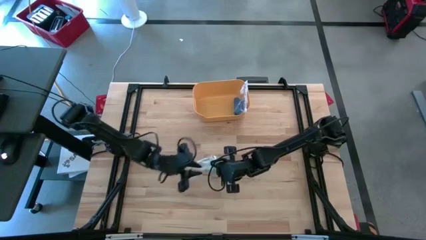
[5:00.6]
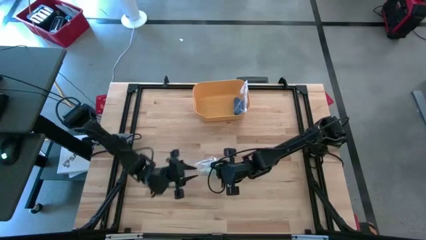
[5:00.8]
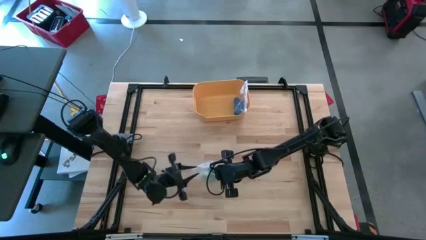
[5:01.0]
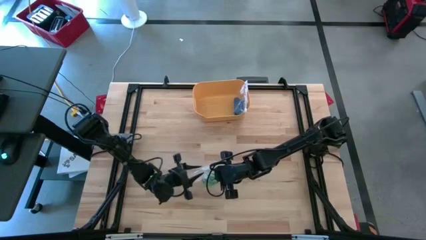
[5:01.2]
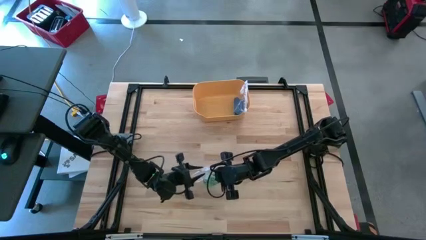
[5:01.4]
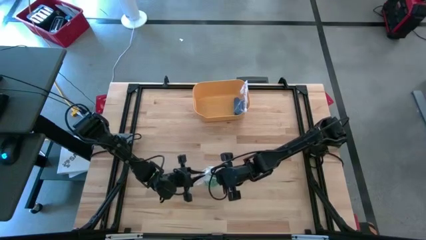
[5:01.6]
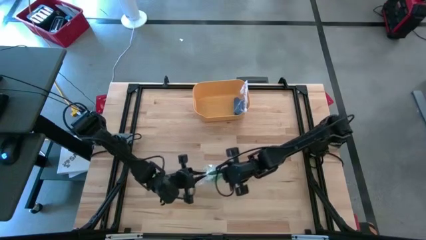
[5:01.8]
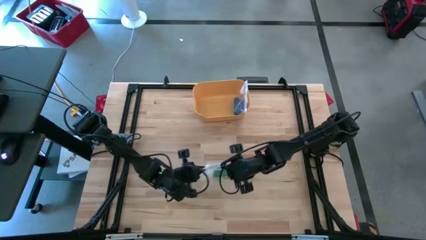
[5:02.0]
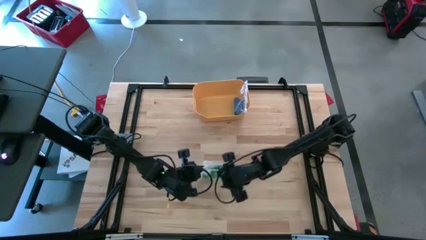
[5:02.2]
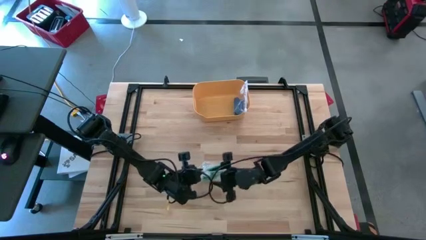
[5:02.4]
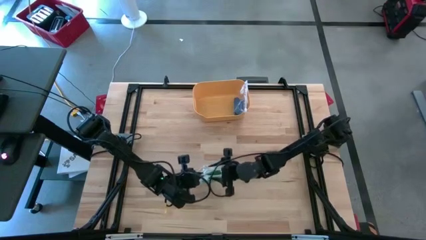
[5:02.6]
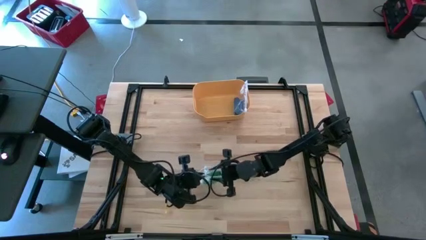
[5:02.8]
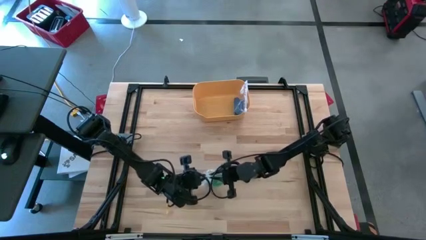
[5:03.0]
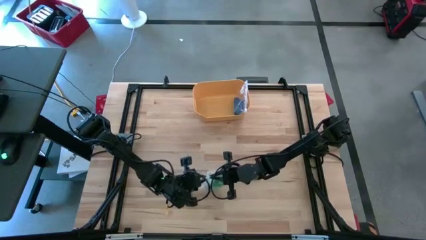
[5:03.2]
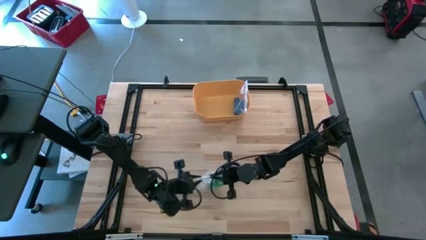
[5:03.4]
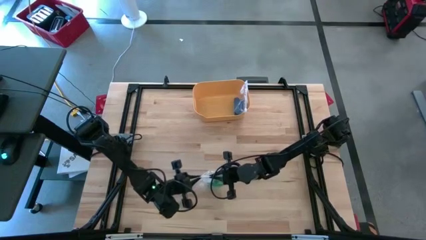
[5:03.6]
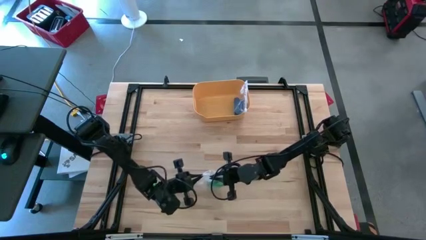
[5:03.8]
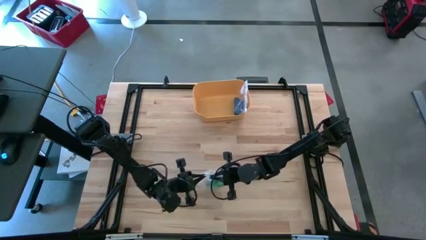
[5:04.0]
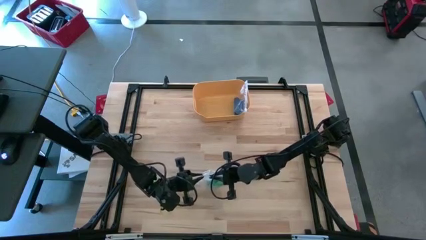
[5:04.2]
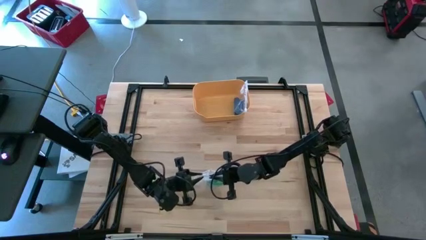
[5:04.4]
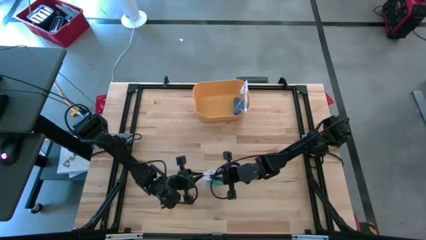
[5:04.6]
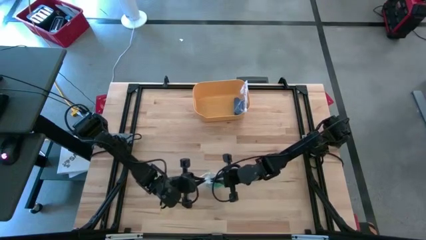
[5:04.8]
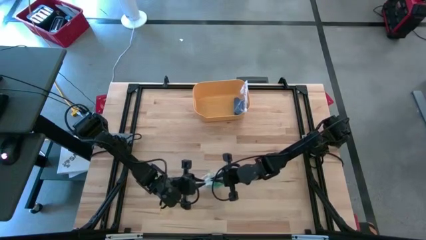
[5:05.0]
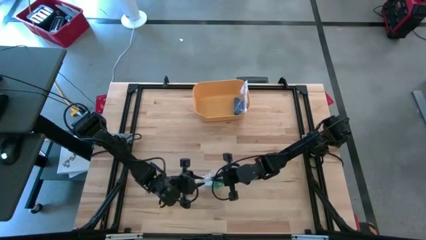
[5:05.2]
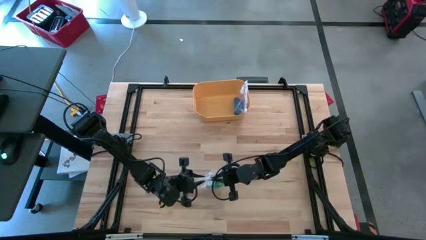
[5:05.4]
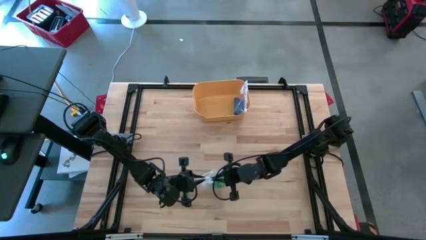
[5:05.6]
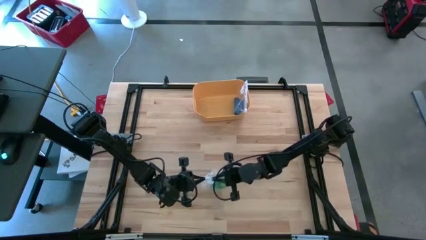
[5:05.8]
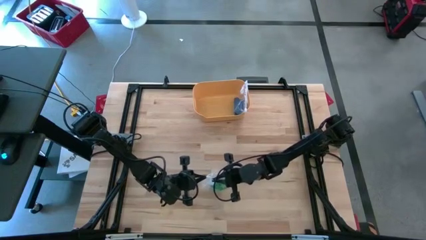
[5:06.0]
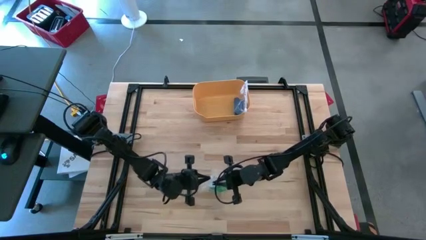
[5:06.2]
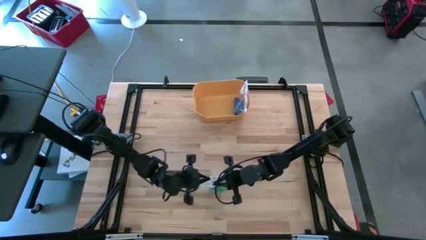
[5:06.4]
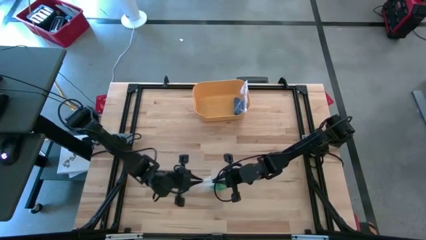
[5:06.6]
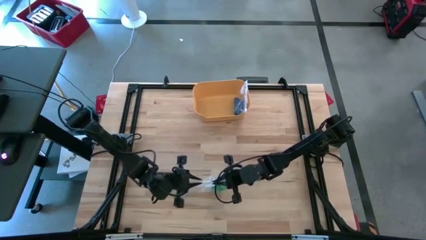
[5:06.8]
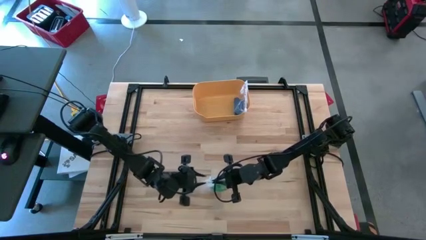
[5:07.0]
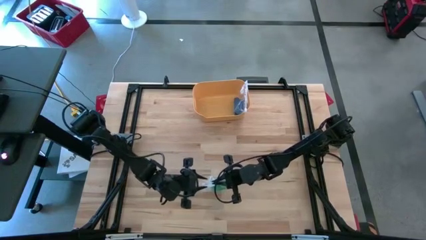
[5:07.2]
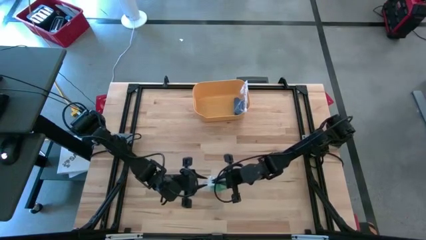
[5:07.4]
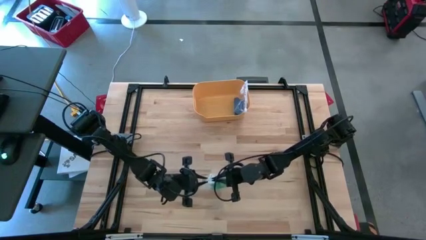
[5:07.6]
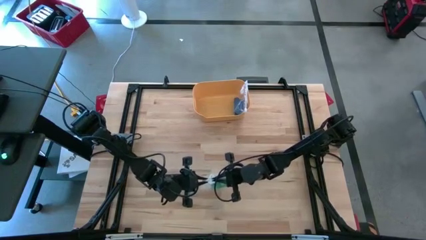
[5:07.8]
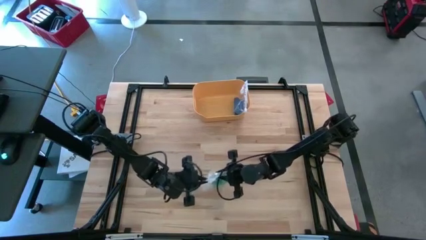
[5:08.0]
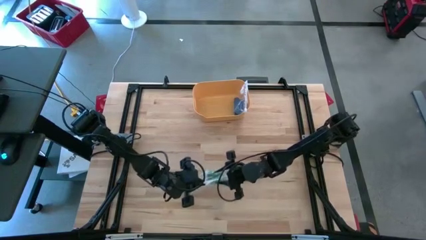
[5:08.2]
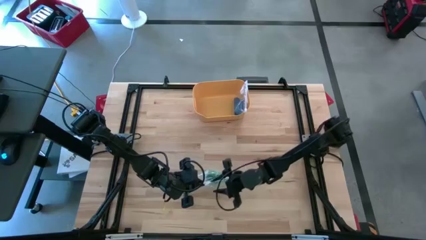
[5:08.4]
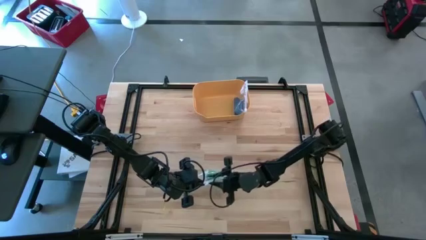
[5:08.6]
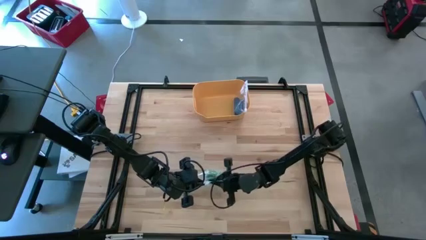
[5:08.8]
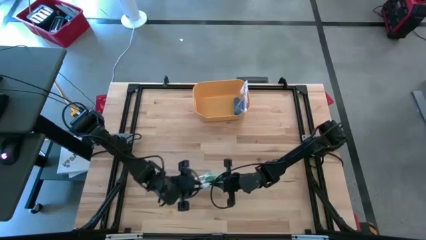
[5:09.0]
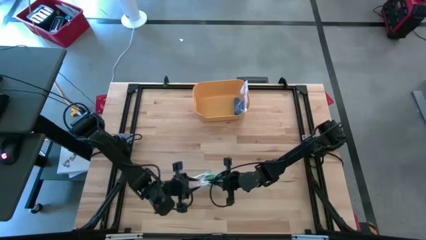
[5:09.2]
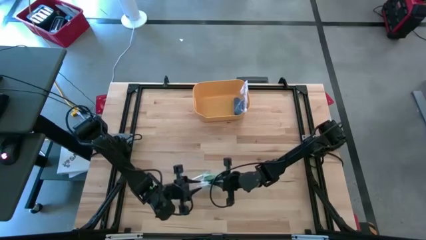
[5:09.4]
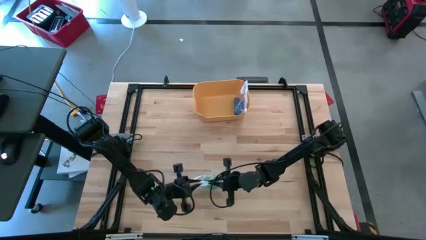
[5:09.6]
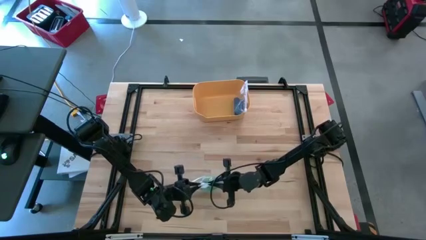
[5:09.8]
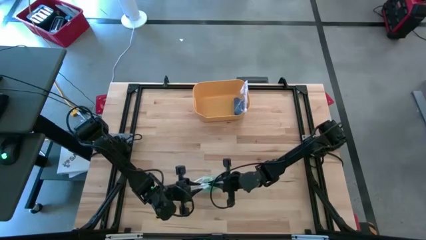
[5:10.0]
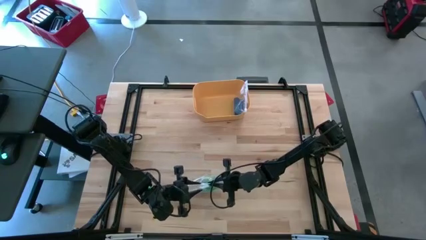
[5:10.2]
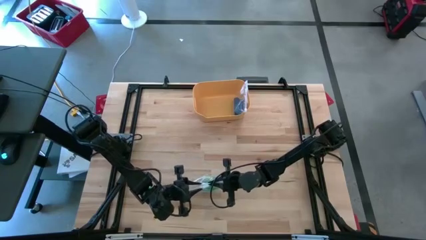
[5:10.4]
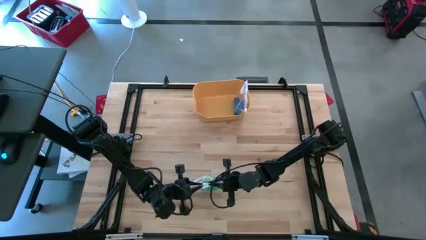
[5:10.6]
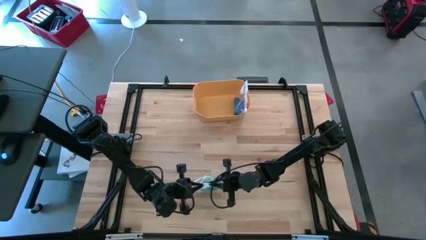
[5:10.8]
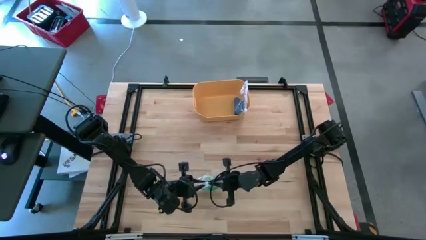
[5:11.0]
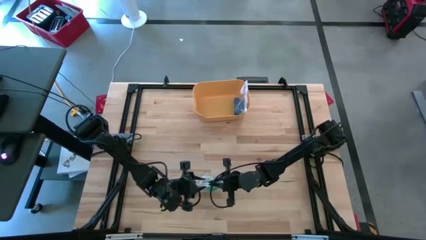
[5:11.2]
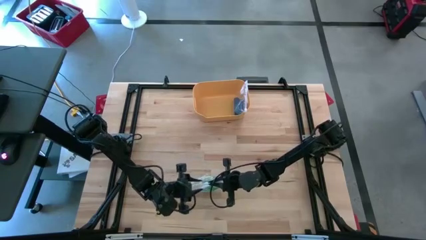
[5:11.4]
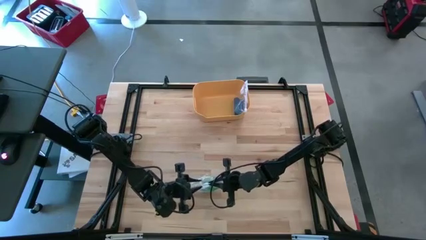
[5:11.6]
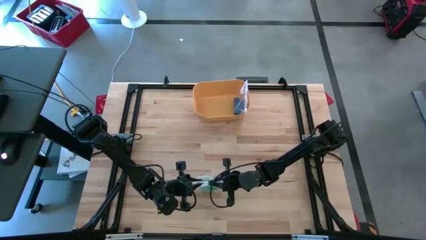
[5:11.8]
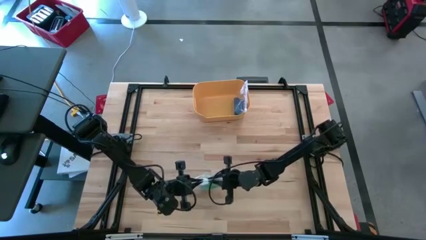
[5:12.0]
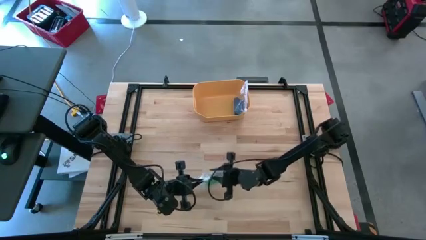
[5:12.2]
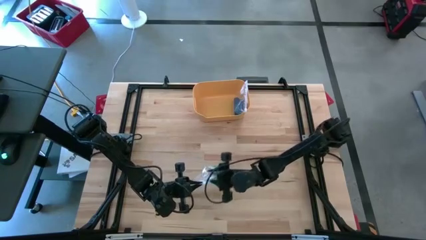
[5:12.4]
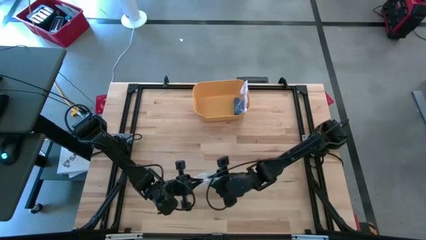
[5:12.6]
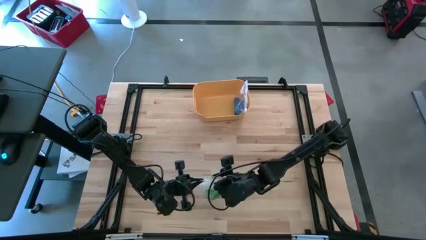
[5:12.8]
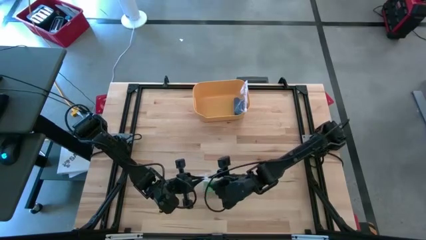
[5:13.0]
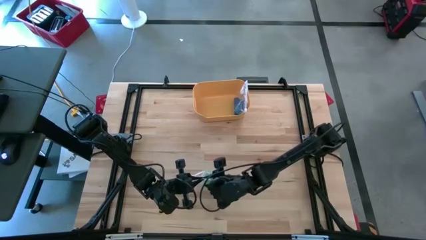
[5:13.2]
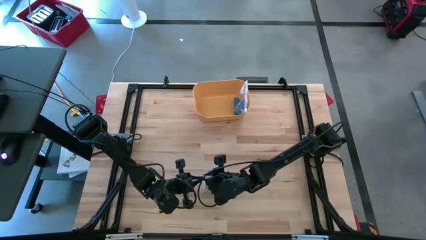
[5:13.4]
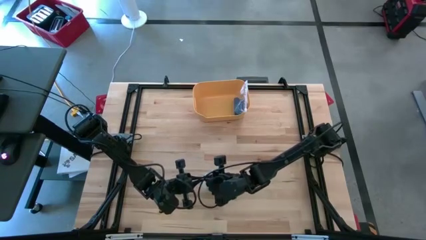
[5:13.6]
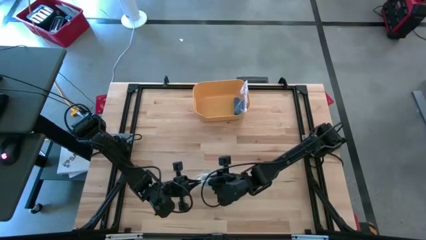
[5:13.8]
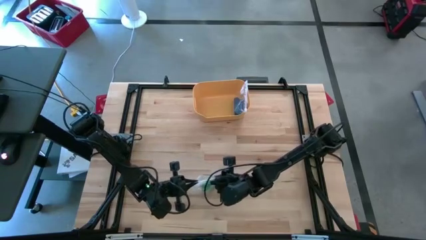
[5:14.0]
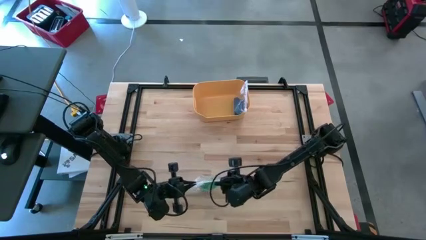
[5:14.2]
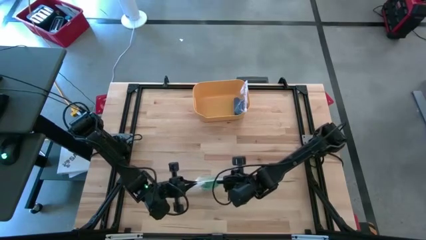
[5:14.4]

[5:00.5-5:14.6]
Task: Roll bandage
Close the transparent zip bag containing the rolled green bandage

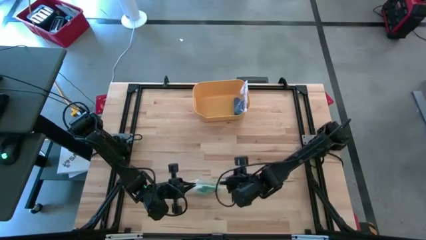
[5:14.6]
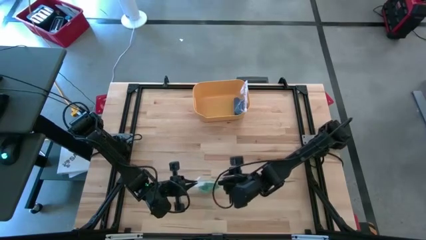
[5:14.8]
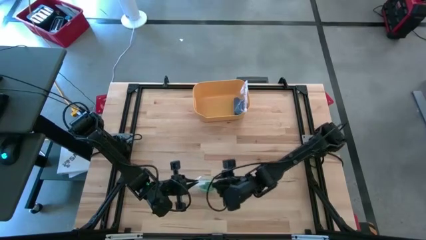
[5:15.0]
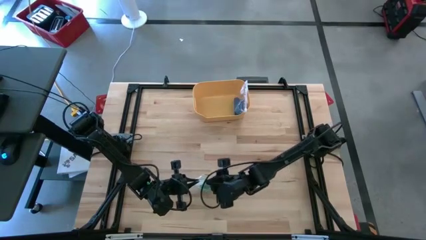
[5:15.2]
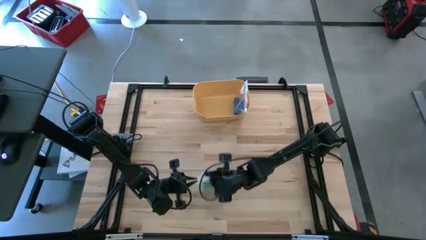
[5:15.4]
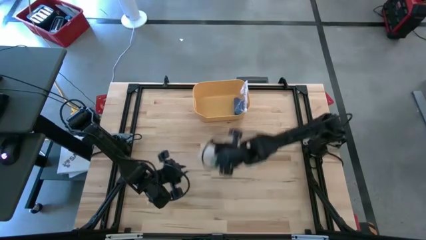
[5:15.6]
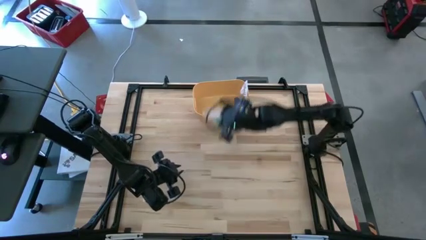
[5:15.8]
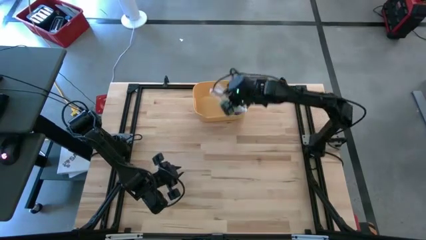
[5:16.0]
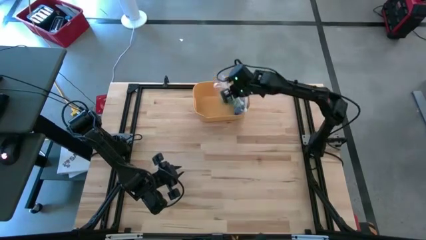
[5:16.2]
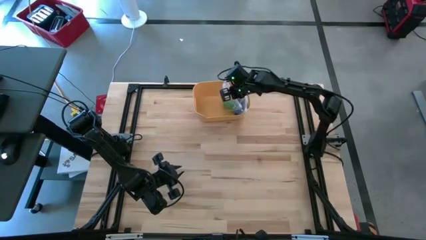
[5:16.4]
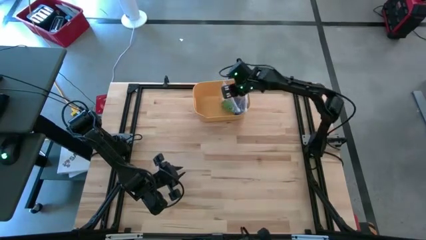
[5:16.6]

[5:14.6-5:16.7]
Put the transparent zip bag containing the rolled green bandage into the yellow bin
